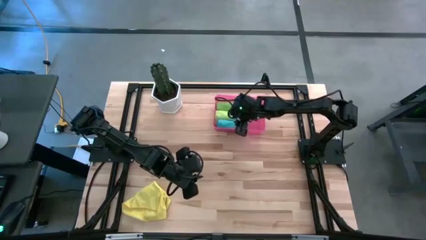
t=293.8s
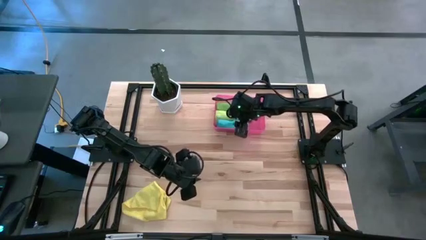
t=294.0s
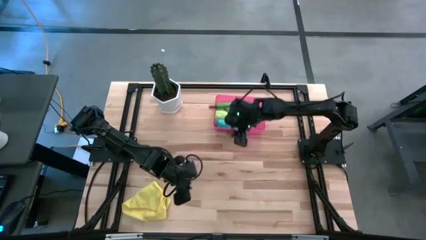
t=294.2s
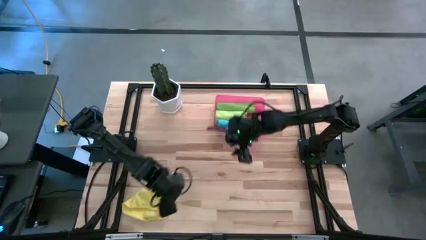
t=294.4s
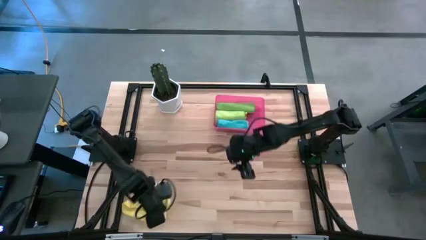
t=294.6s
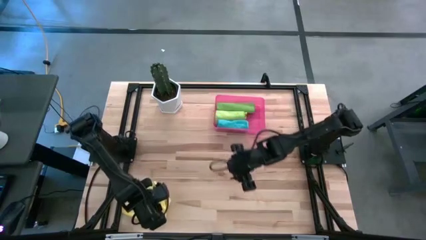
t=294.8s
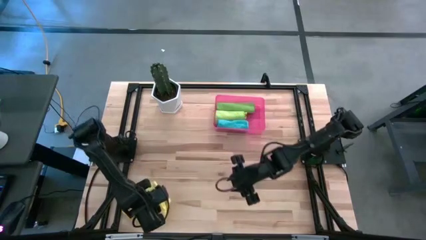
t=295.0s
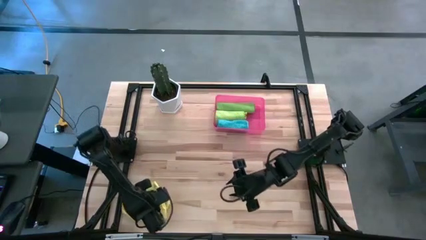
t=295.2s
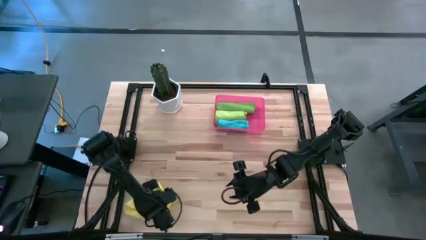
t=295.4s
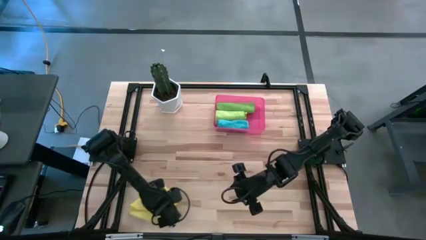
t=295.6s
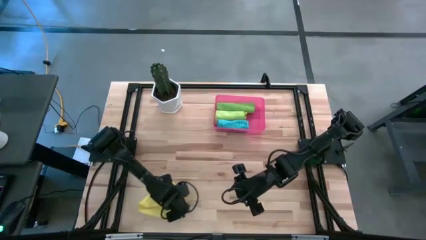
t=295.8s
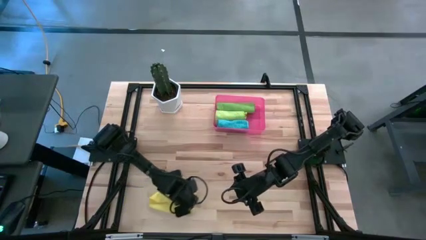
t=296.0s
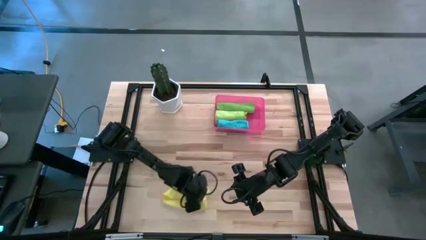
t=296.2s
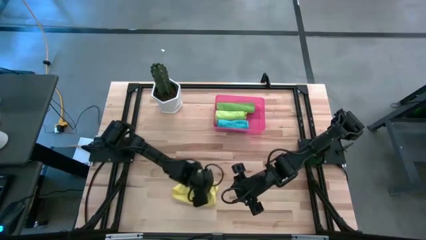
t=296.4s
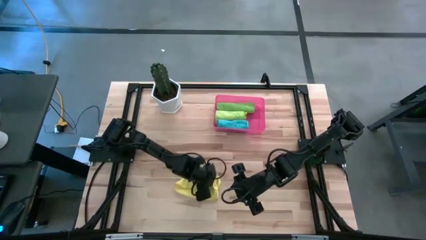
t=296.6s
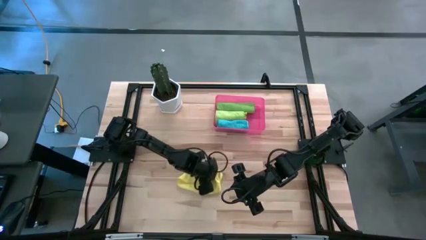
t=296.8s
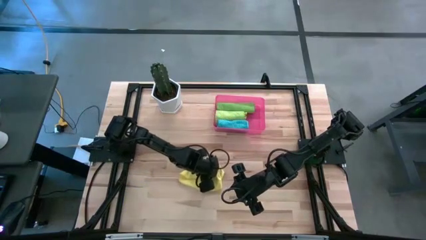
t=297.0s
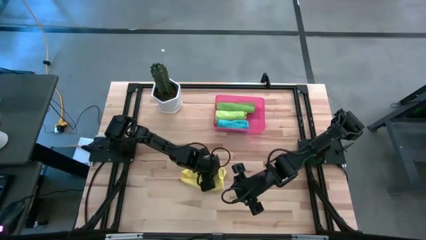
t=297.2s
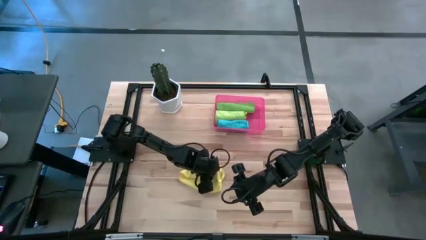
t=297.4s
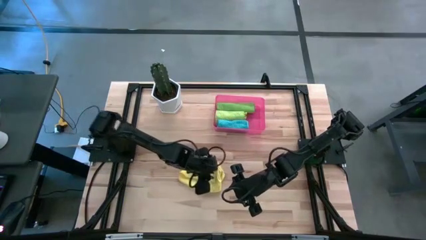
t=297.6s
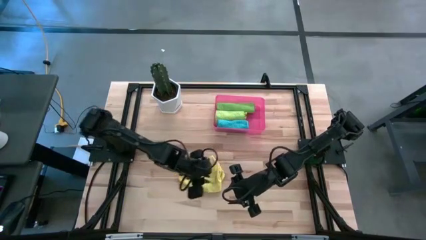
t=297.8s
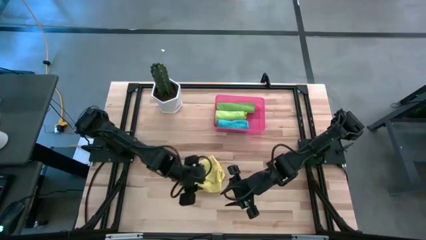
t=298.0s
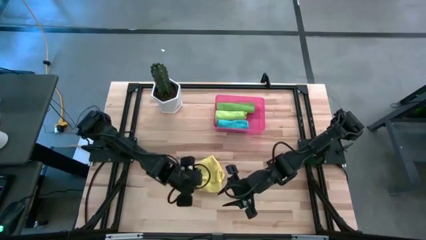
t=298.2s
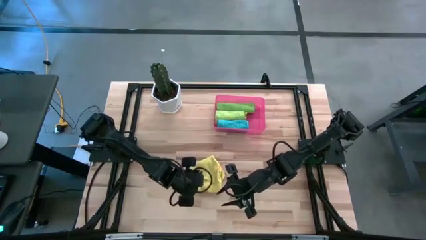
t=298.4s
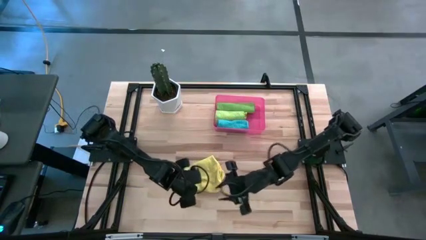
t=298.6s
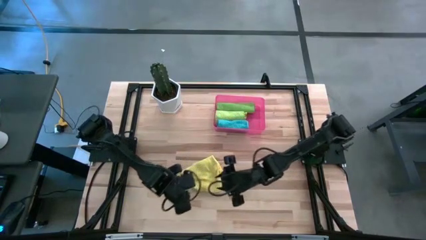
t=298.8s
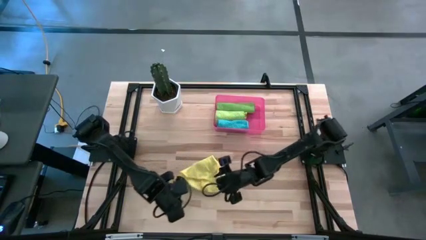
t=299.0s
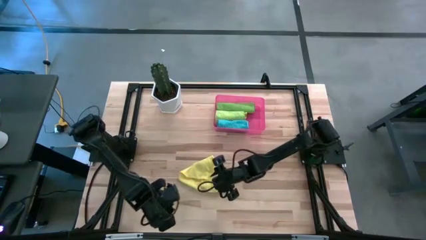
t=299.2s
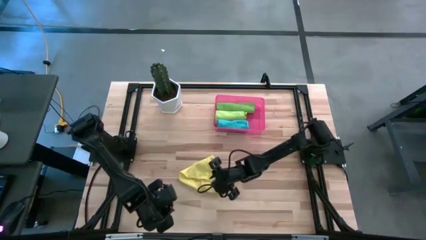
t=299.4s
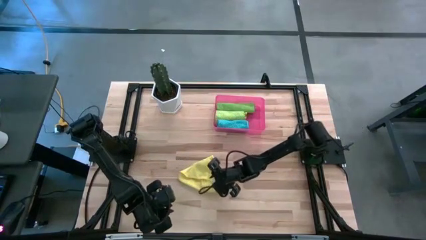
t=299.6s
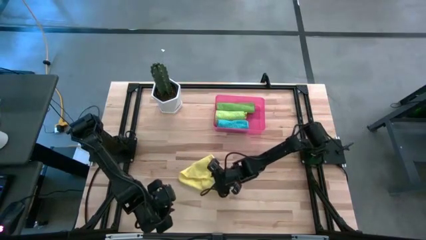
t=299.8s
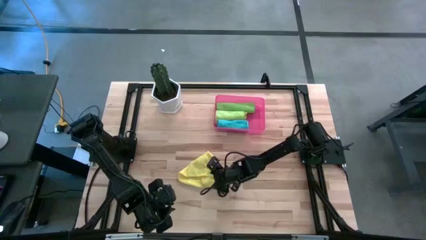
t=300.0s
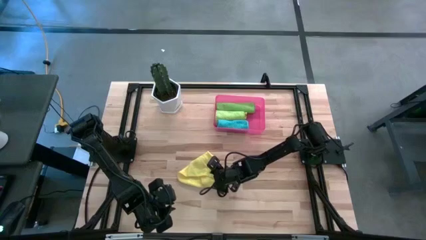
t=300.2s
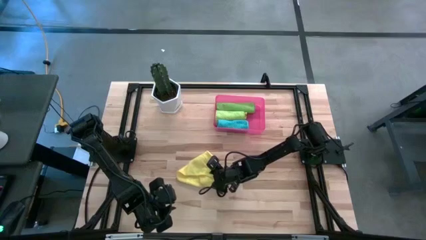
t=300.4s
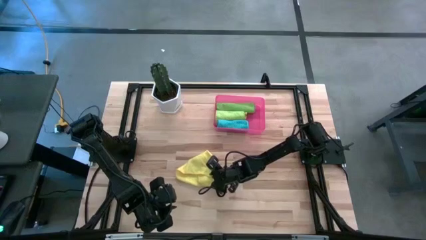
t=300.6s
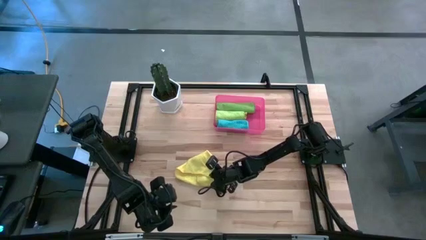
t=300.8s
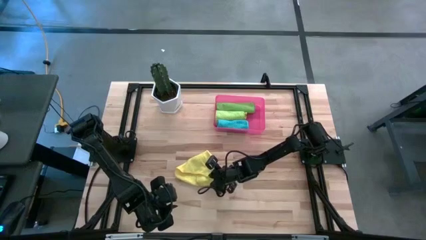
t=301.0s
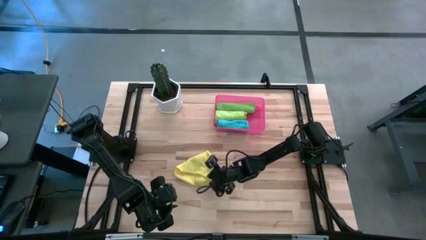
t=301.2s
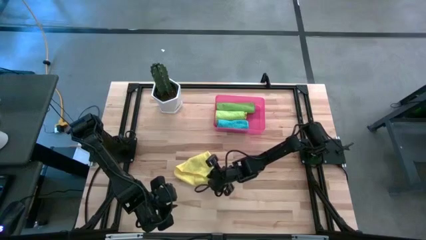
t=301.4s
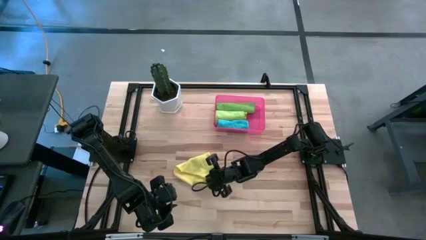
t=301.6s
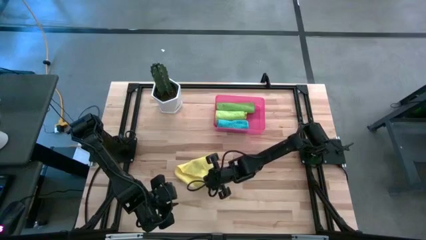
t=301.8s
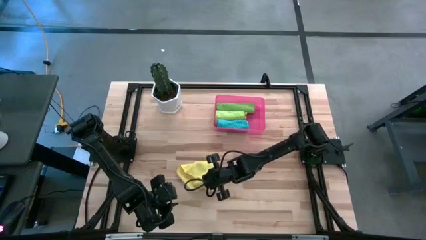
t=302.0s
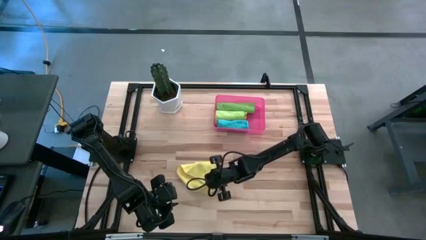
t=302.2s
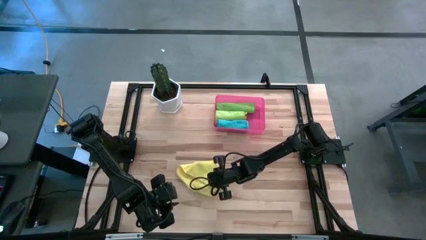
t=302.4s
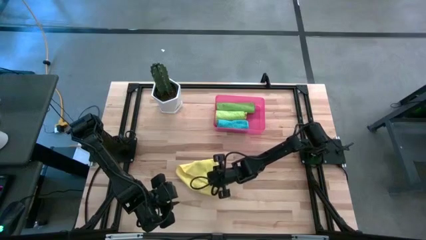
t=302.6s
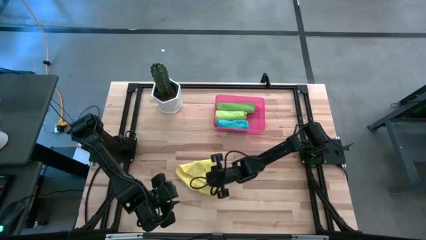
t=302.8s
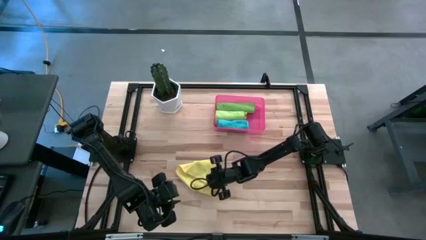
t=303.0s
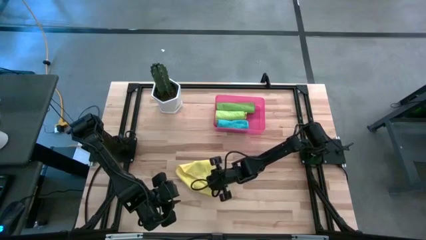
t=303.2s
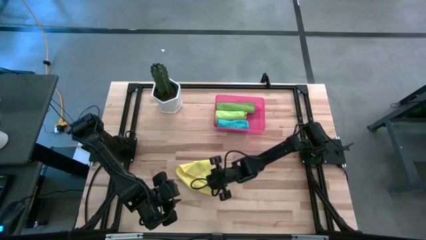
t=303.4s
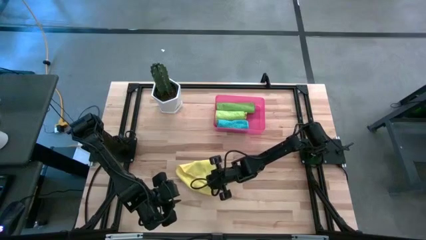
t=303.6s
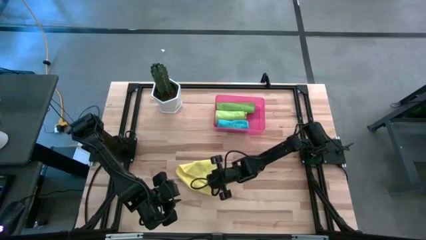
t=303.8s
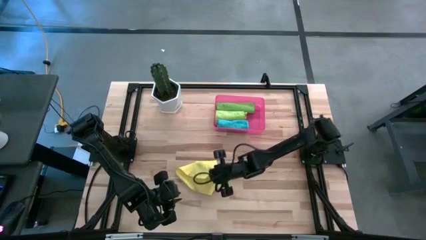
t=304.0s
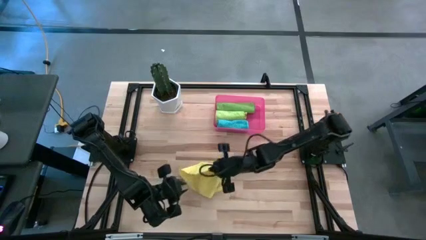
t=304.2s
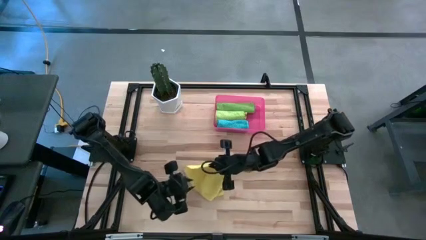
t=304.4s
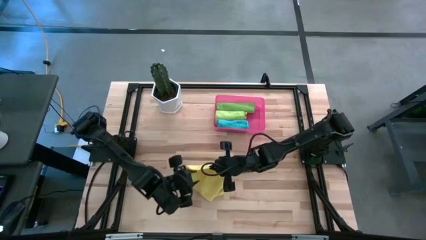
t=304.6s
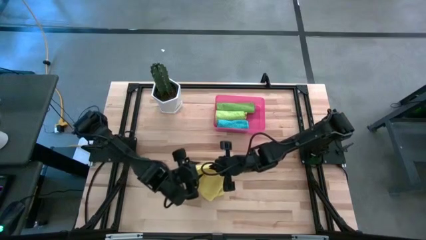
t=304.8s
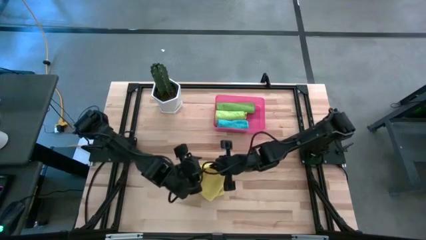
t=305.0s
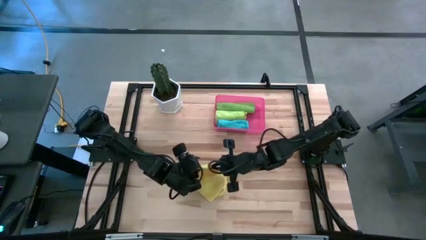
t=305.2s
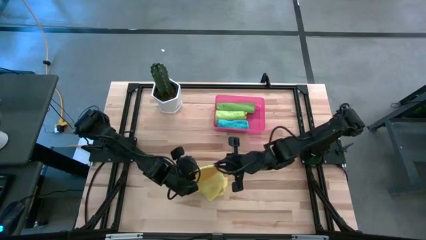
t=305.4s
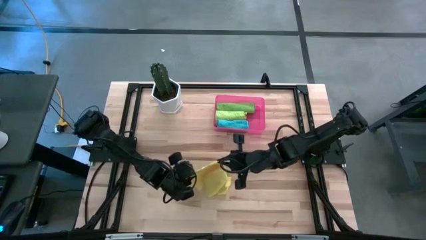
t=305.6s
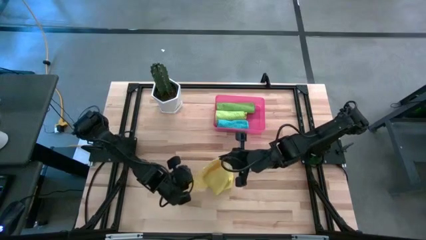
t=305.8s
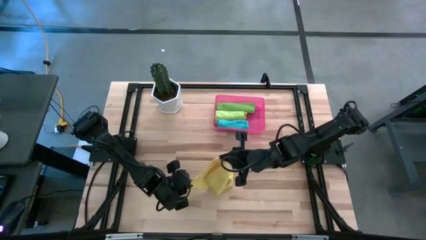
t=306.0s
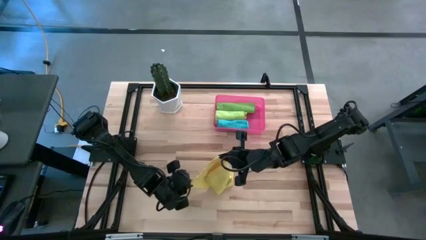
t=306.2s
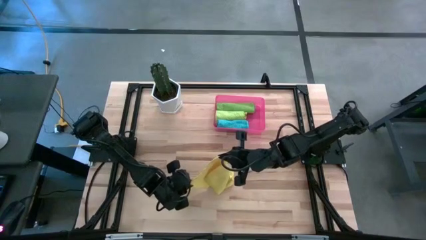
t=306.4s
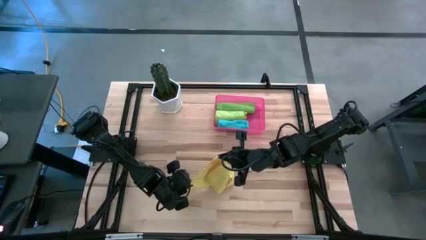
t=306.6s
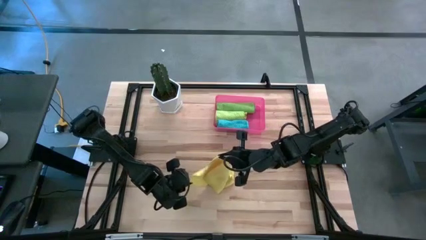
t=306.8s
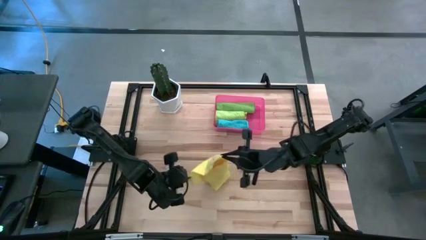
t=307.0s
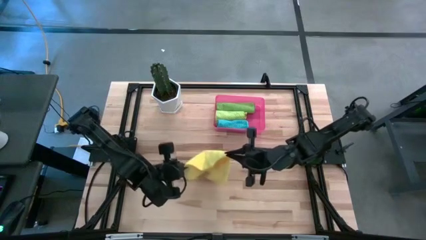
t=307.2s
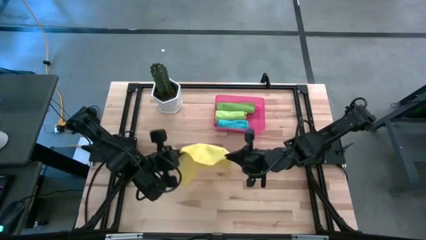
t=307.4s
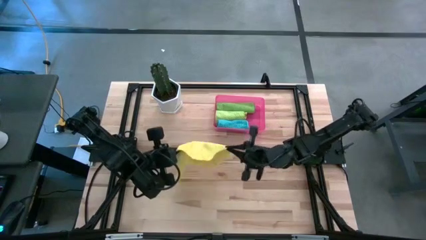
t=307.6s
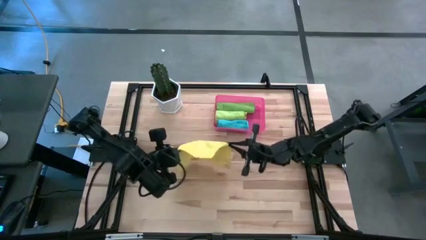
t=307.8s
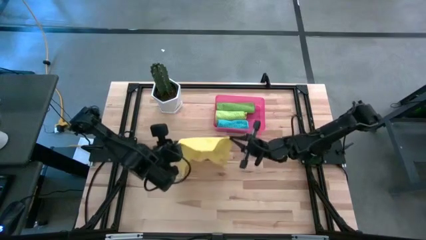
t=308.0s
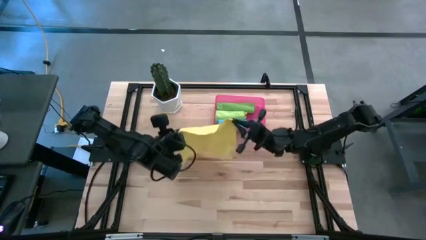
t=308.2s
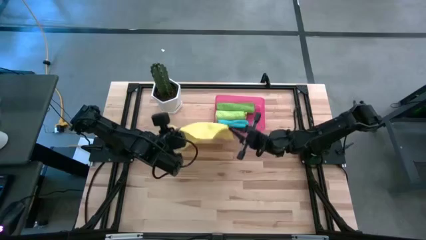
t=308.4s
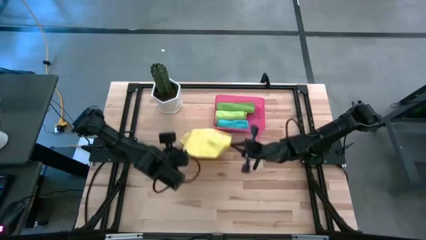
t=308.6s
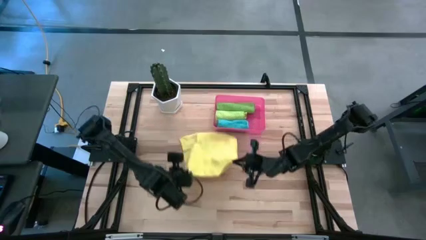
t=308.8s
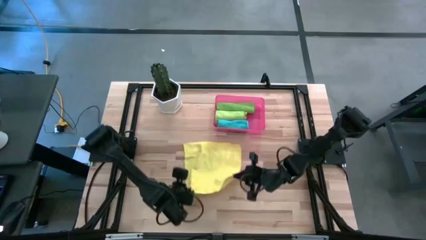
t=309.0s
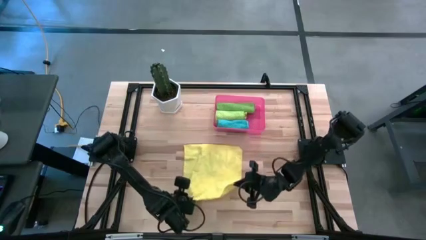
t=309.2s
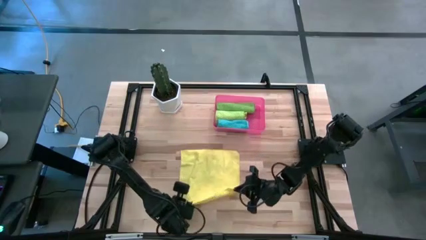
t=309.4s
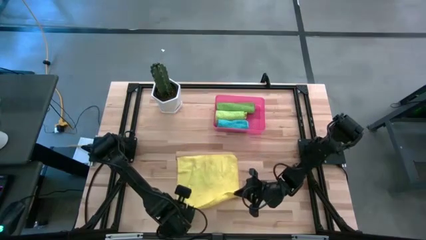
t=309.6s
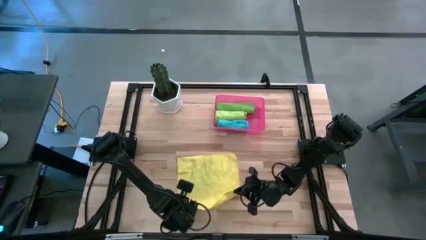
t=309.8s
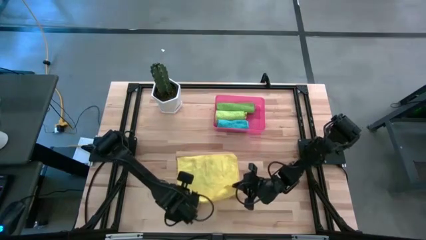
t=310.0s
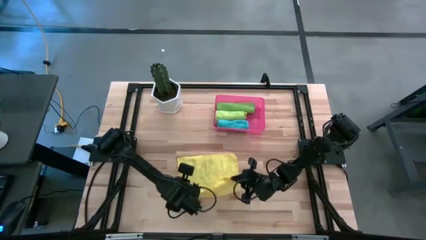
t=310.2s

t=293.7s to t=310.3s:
Task: Roll microfiber towels into tight, uniform cylinder then place into a basket
Roll the yellow microfiber cloth
